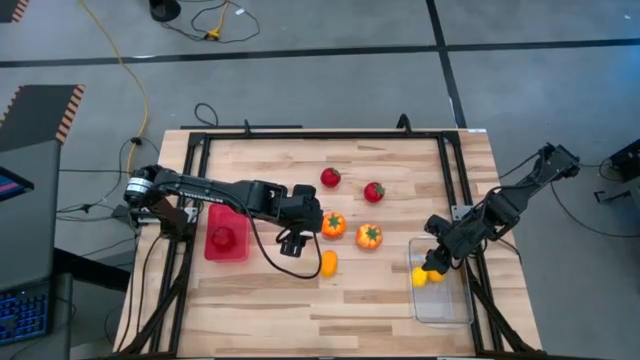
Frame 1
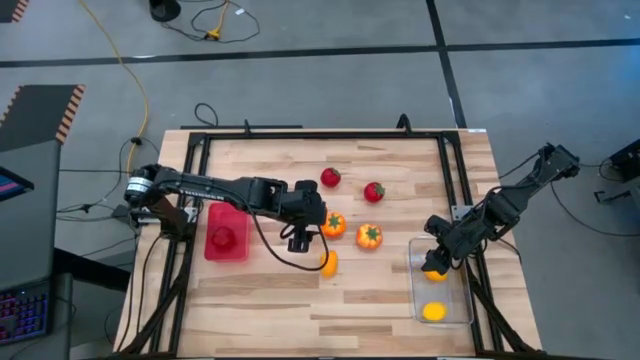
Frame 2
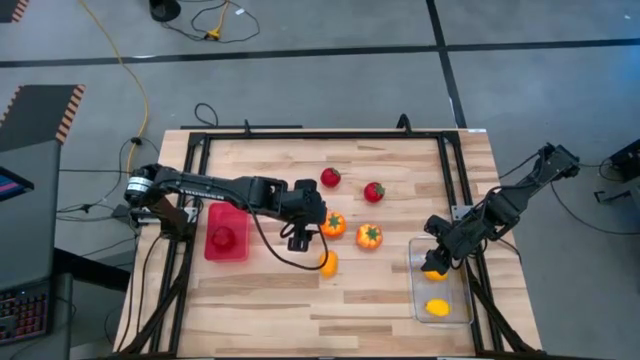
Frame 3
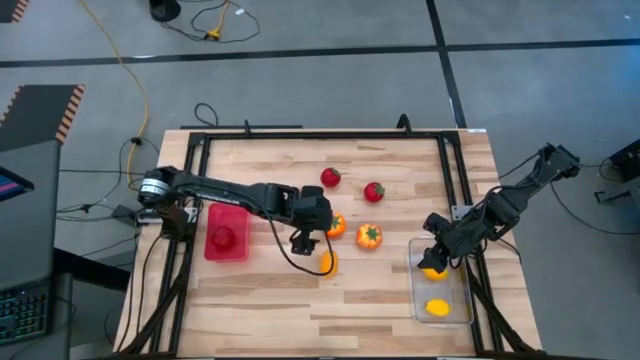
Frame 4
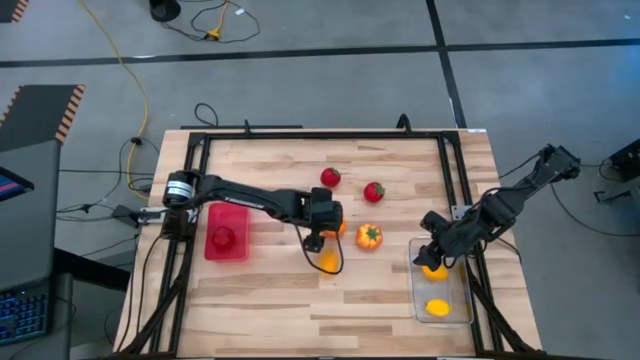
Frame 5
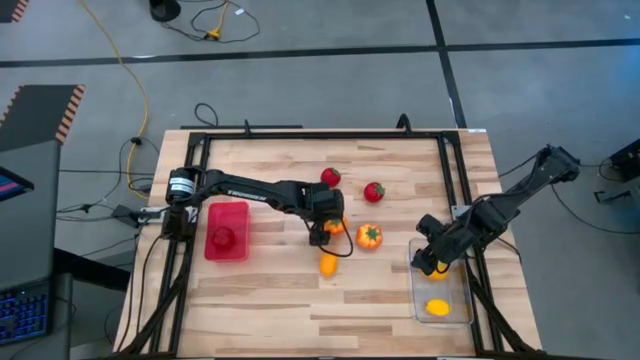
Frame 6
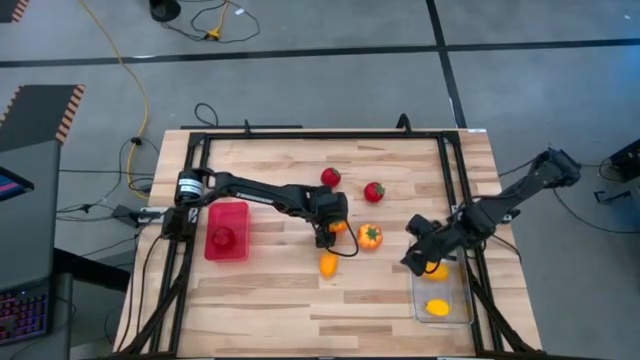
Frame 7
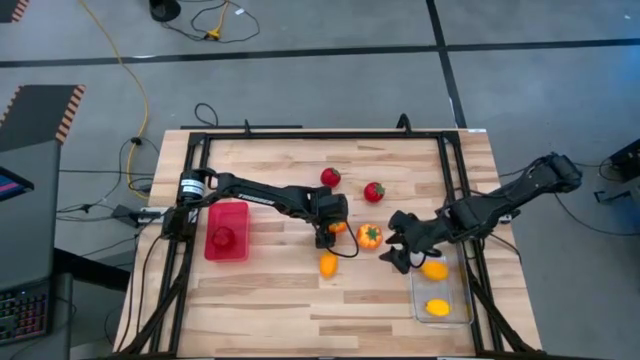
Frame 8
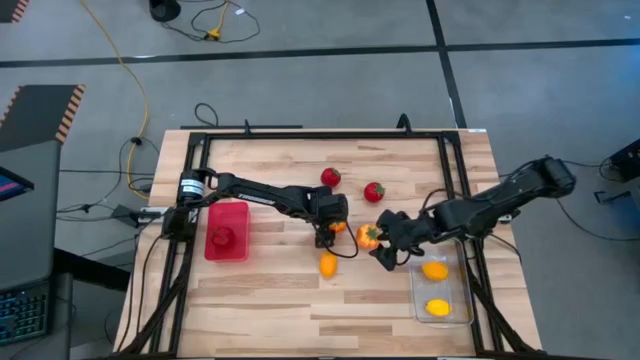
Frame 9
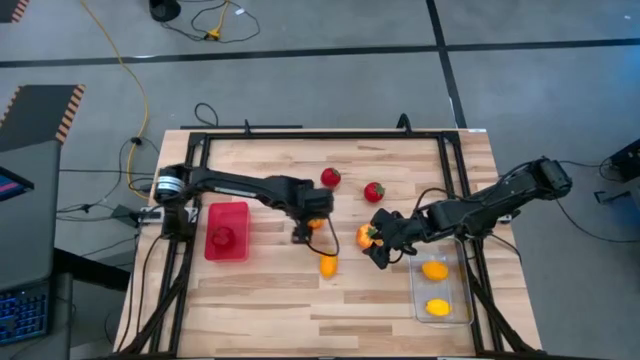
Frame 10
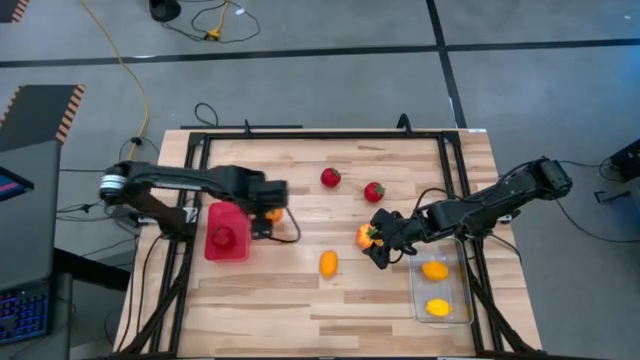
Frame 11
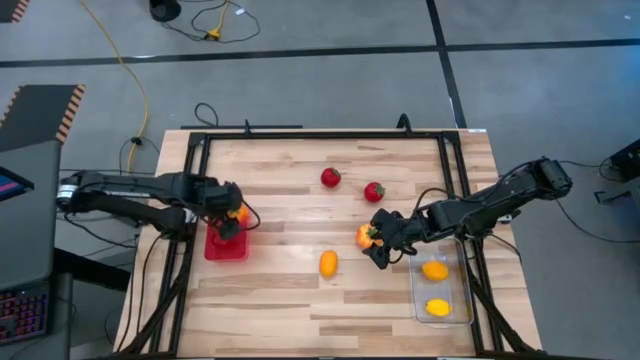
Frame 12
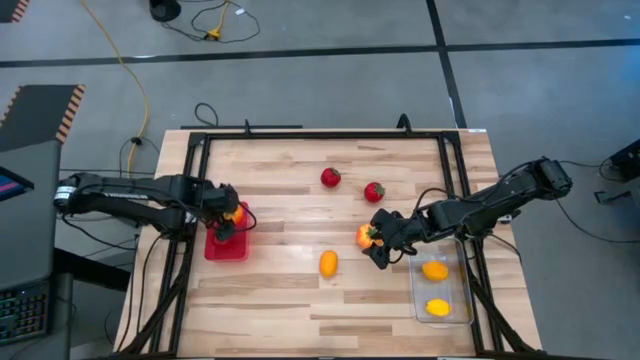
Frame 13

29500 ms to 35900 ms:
Task: Sort produce into baskets
Put the left orange tomato into the red bin

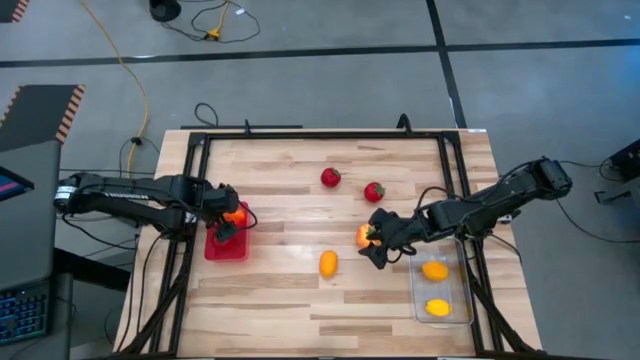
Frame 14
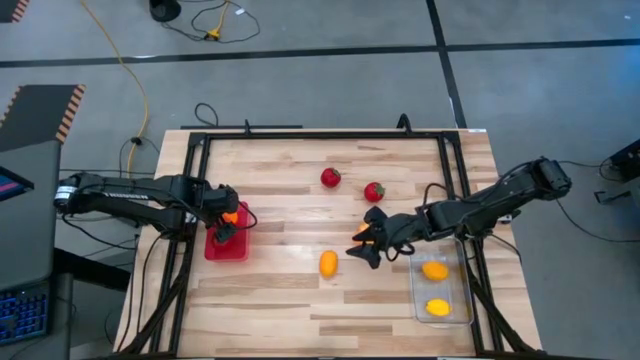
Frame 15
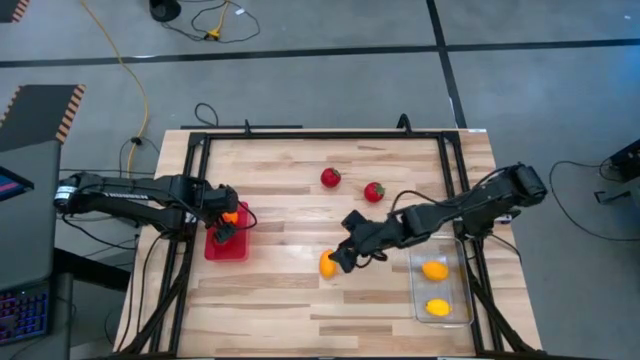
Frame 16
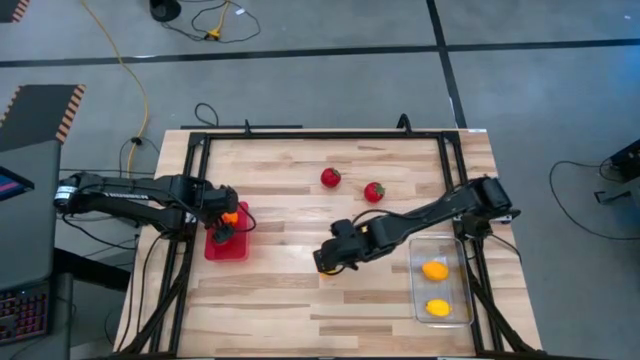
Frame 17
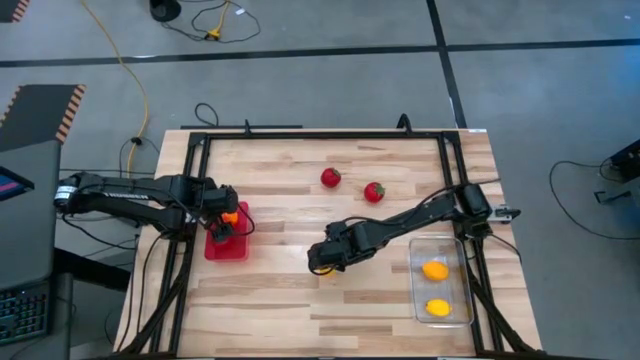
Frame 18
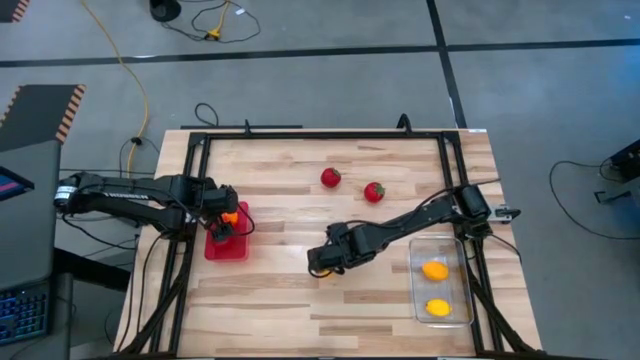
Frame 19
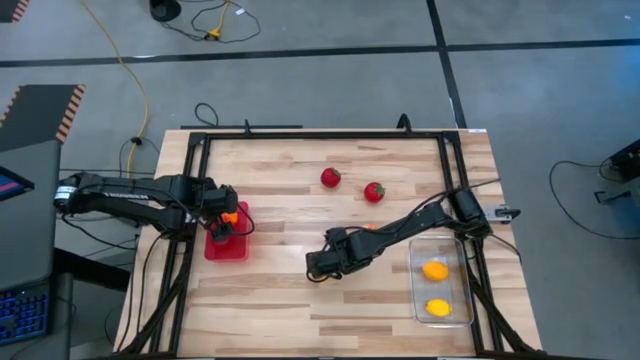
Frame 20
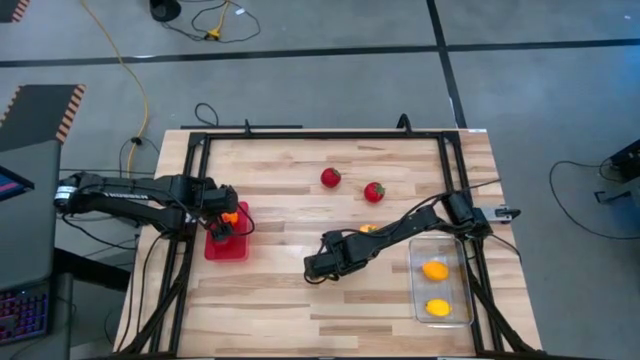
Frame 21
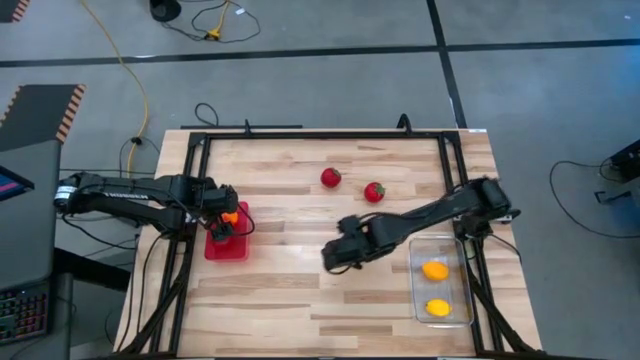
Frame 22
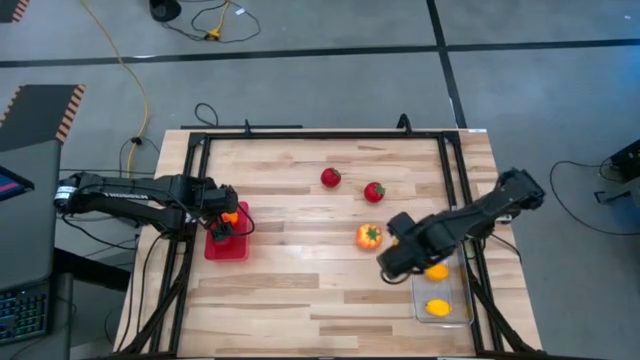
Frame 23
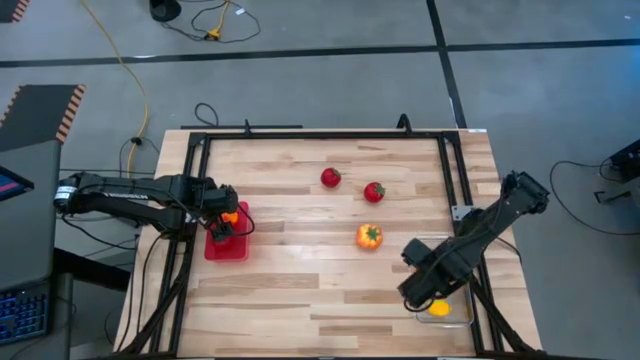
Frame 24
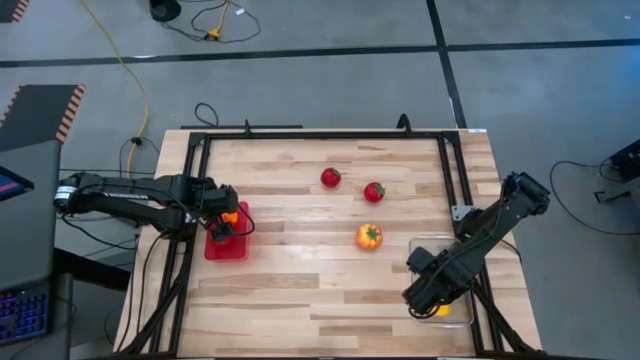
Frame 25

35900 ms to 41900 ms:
Put the yellow lemon into the transparent bin

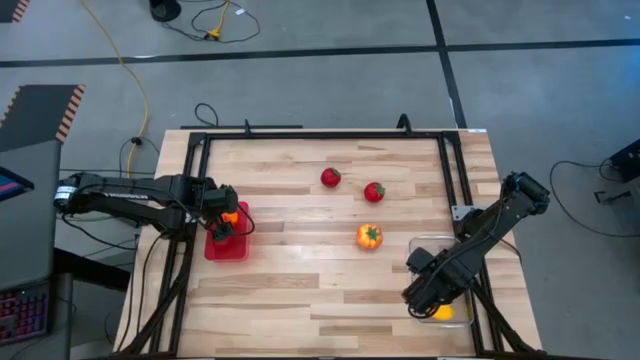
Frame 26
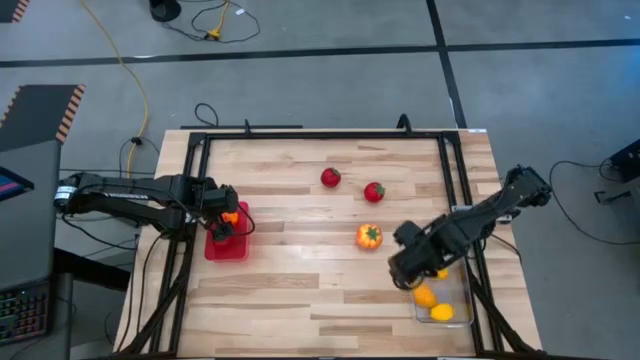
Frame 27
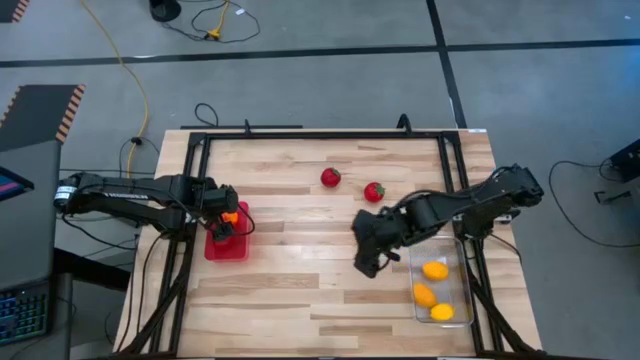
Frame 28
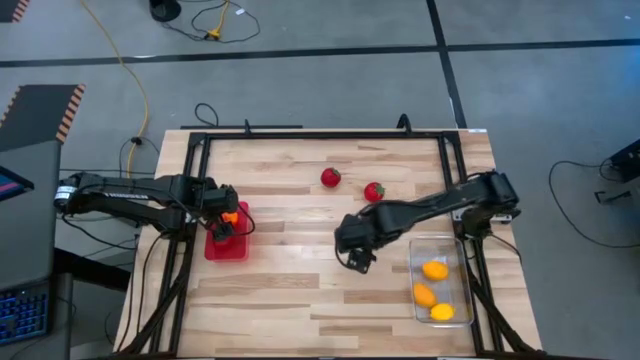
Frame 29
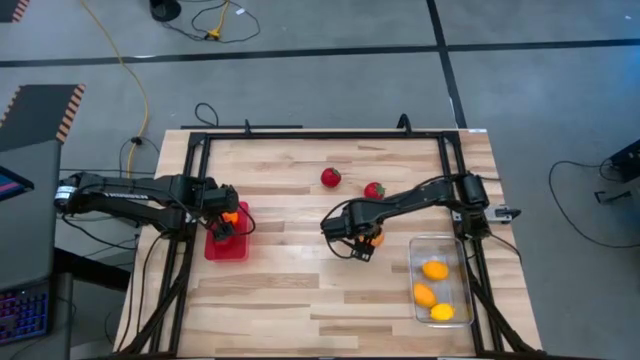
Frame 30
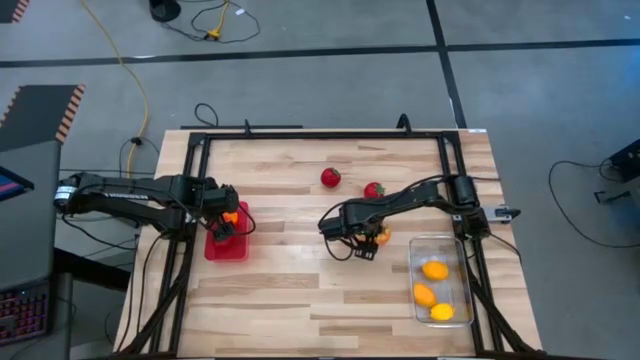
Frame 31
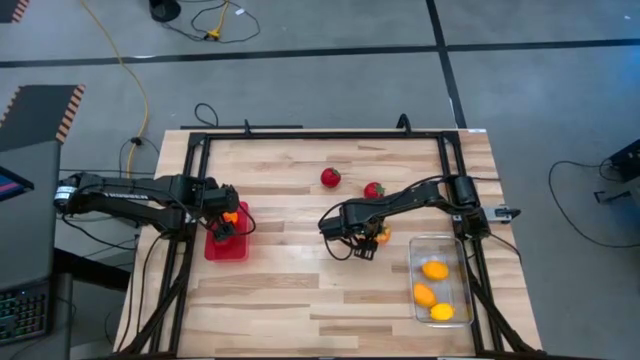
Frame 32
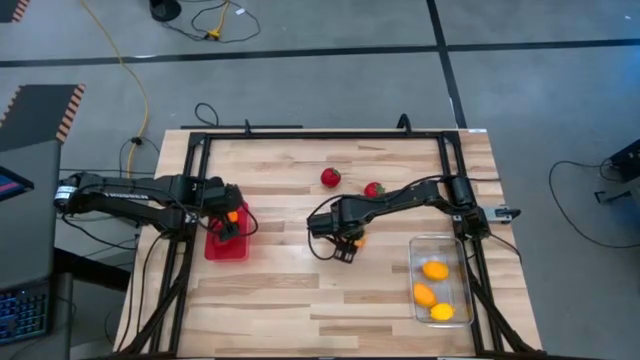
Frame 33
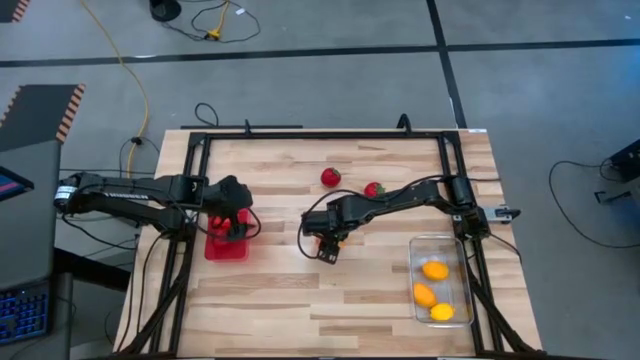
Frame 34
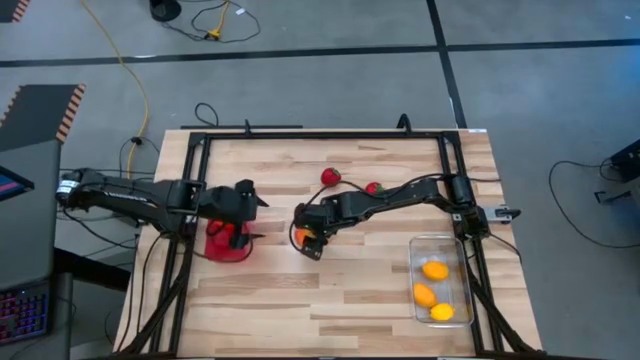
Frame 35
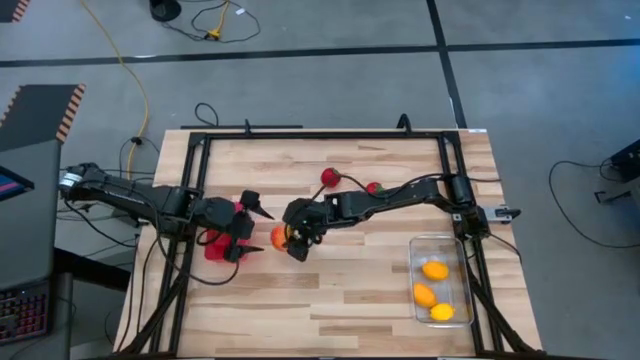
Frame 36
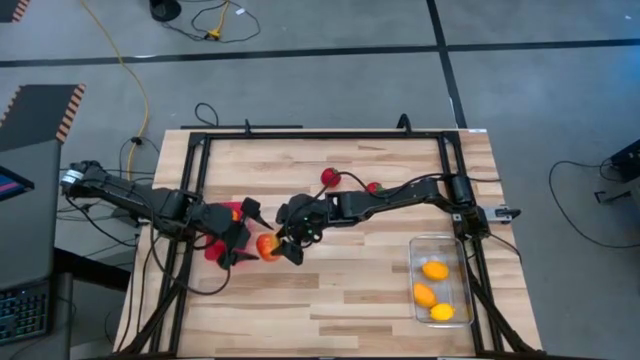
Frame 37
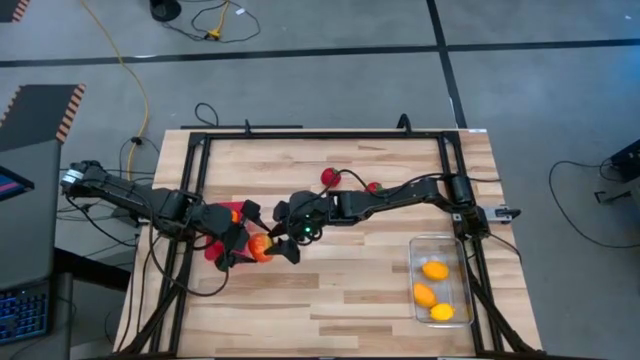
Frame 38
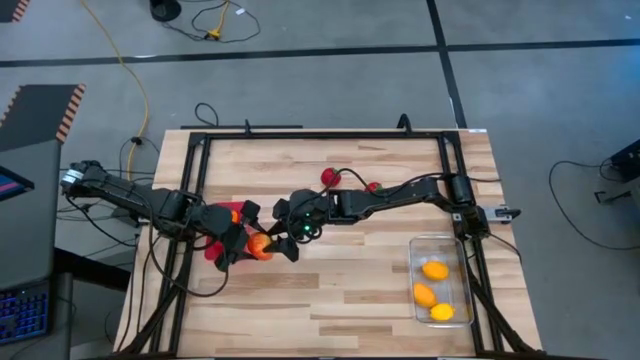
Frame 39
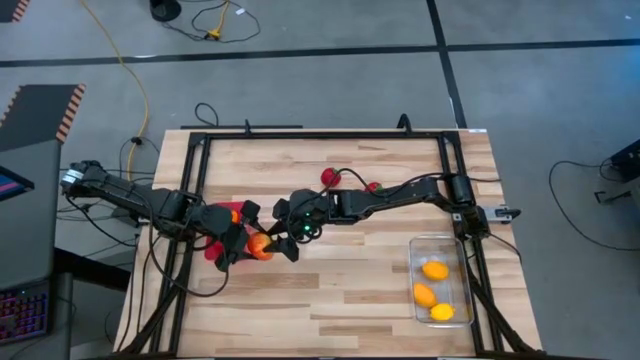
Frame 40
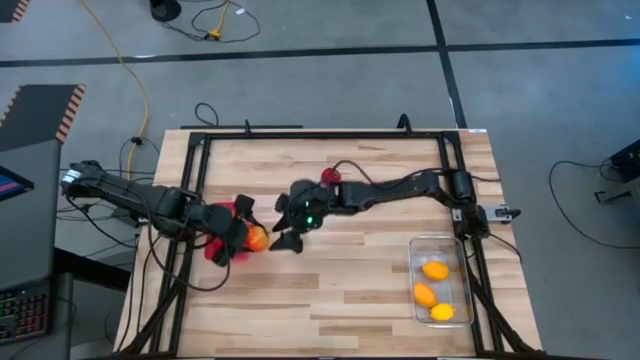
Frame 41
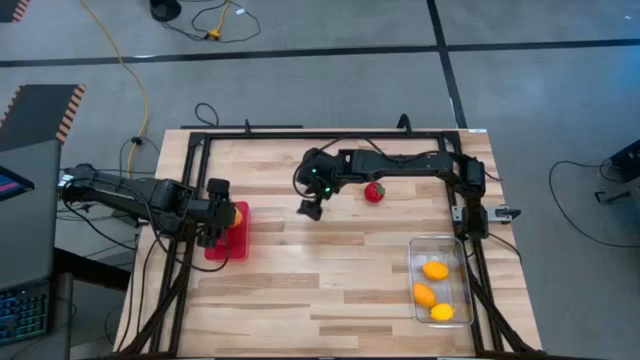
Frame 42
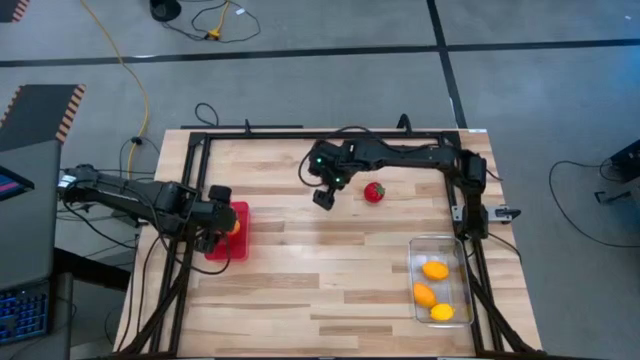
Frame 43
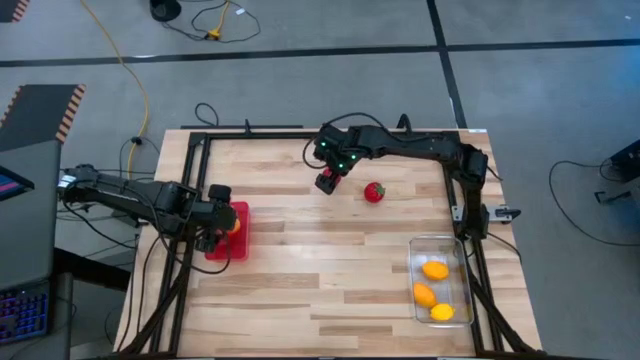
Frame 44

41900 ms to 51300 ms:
Put the orange tomato into the red bin
